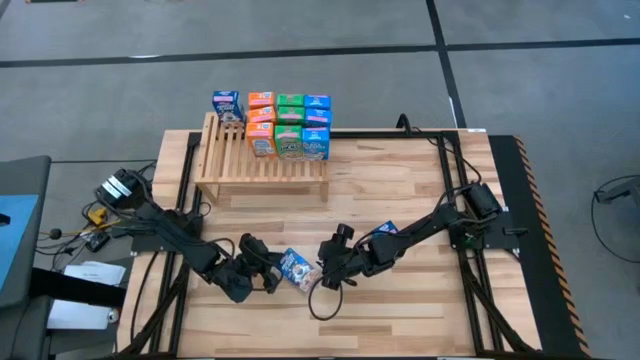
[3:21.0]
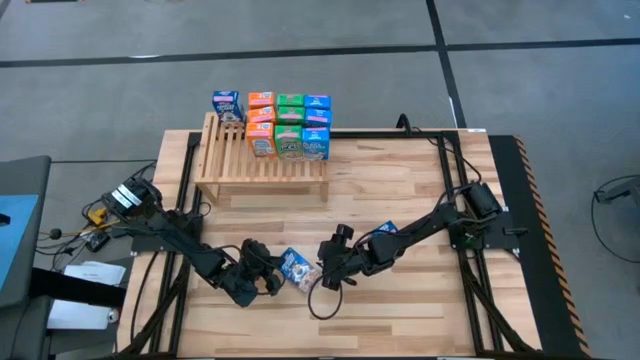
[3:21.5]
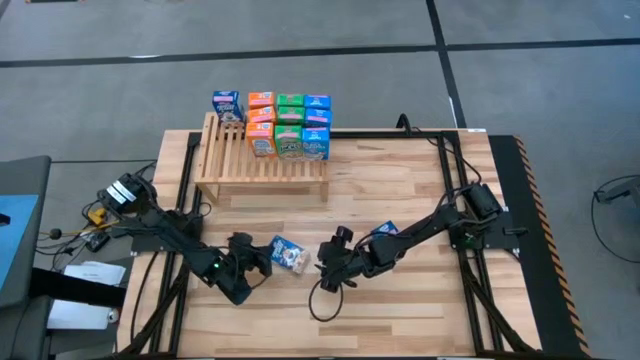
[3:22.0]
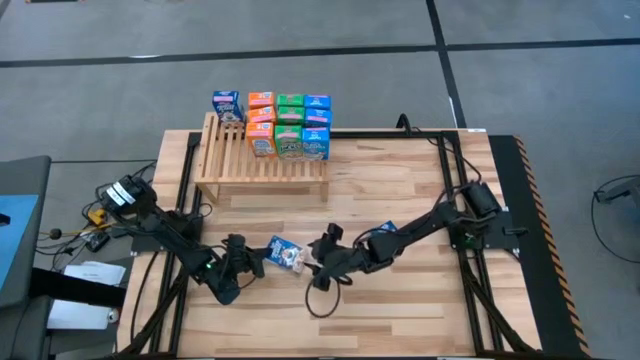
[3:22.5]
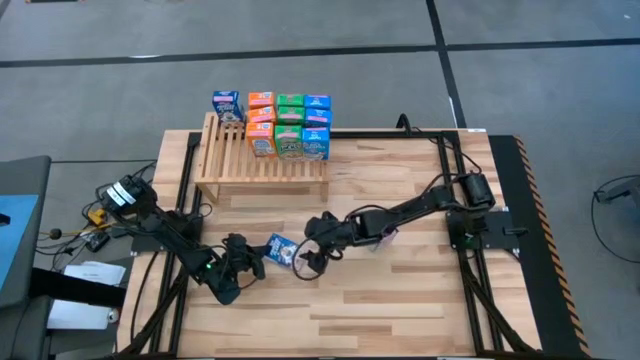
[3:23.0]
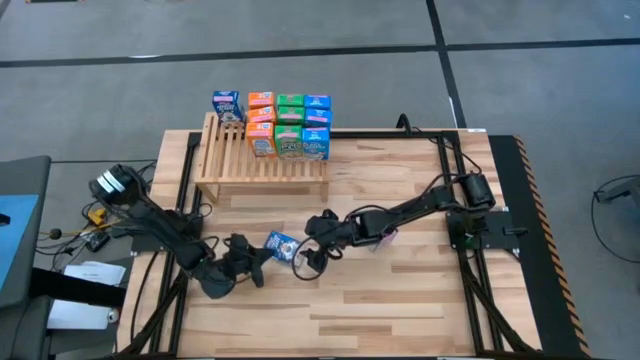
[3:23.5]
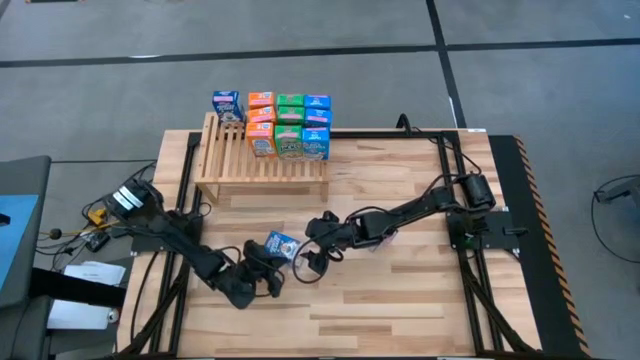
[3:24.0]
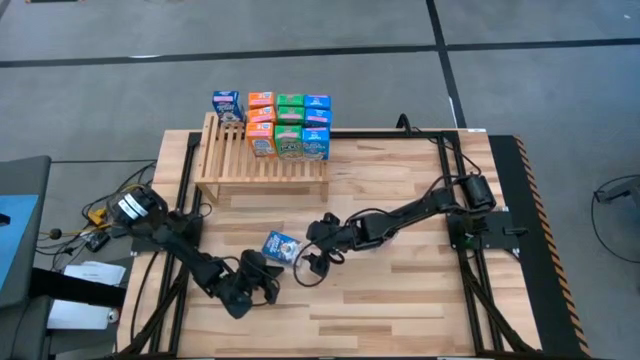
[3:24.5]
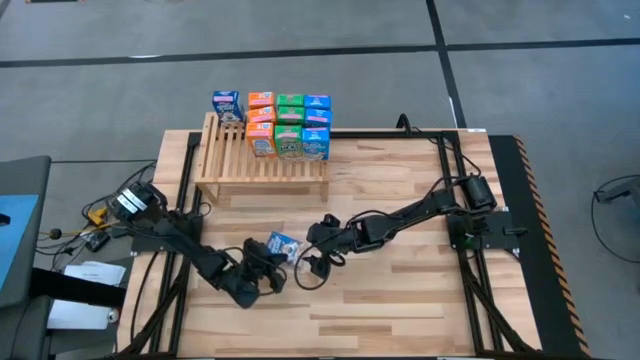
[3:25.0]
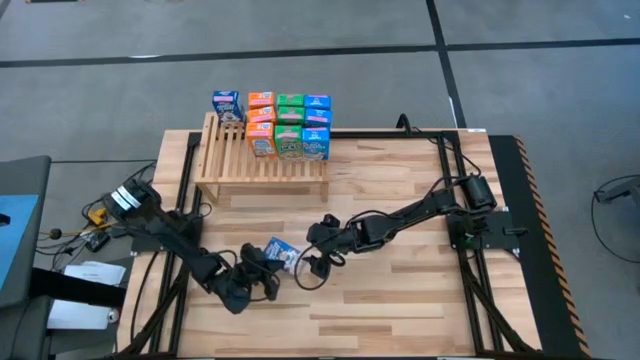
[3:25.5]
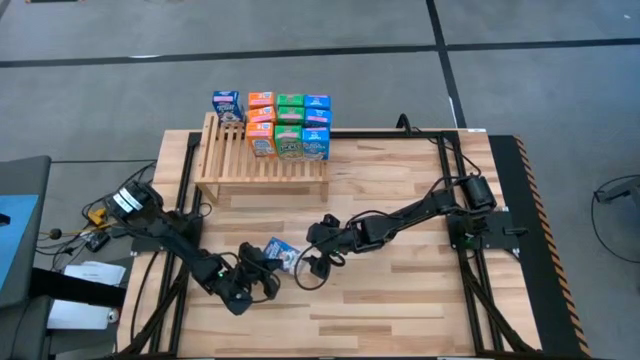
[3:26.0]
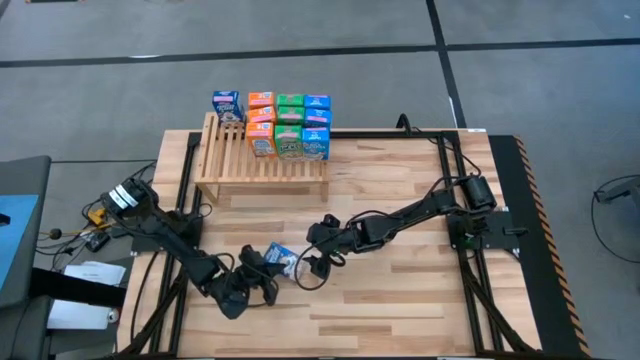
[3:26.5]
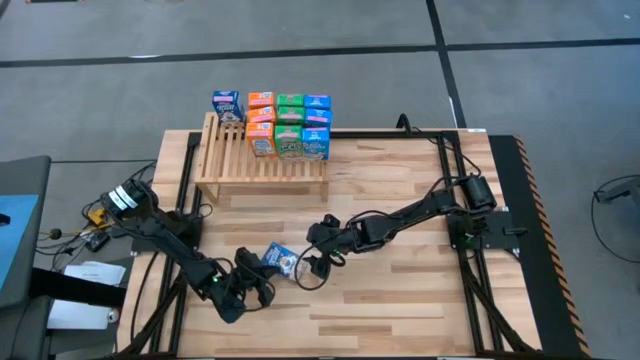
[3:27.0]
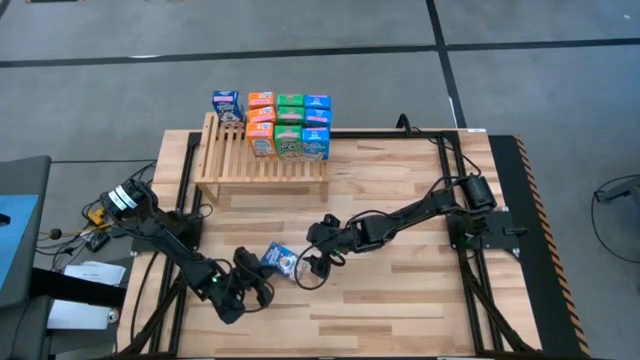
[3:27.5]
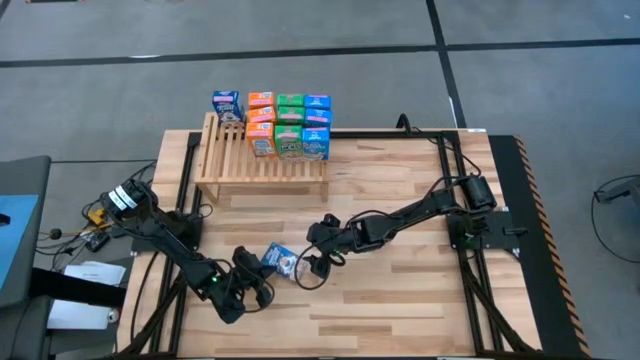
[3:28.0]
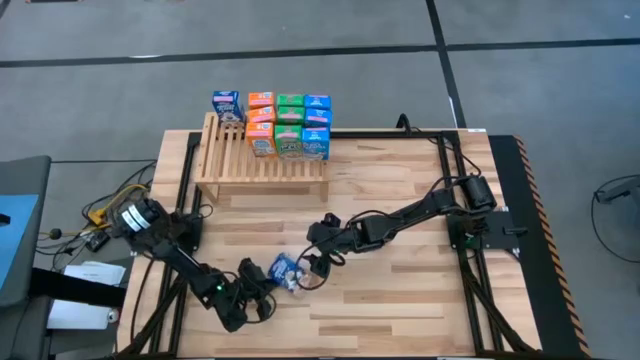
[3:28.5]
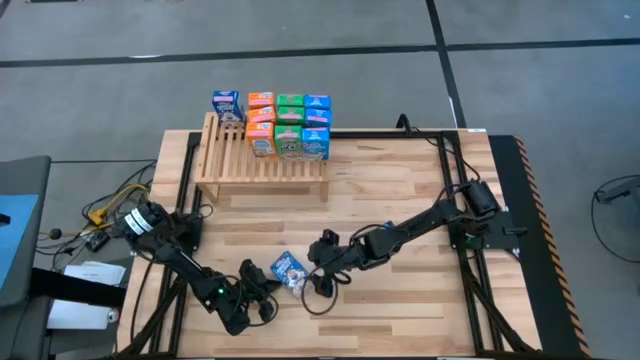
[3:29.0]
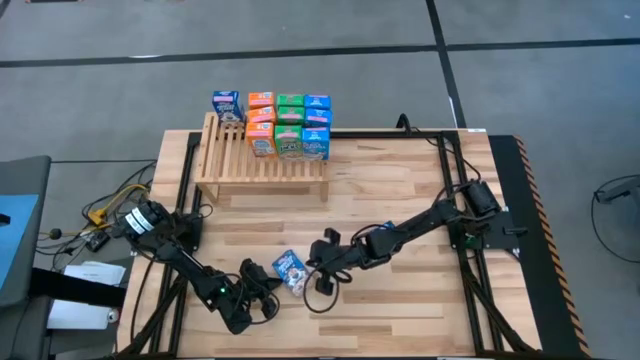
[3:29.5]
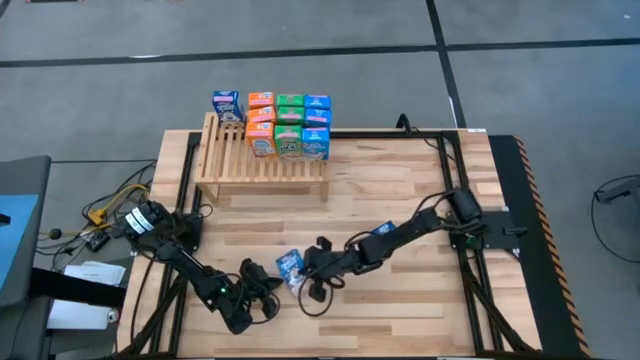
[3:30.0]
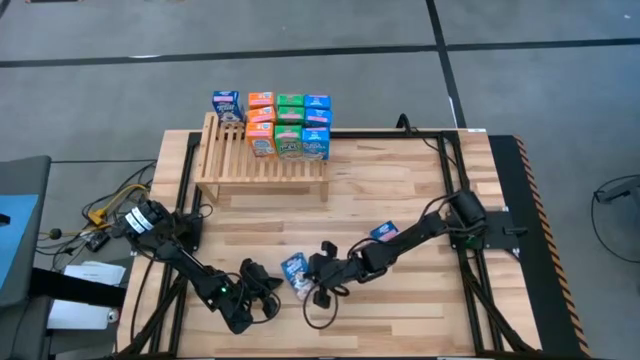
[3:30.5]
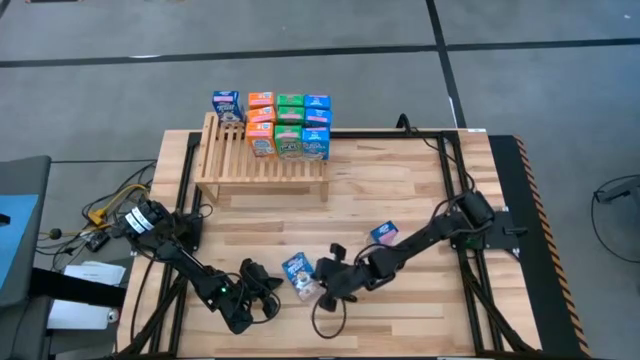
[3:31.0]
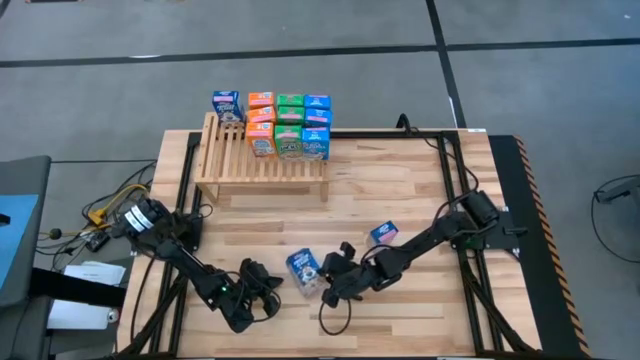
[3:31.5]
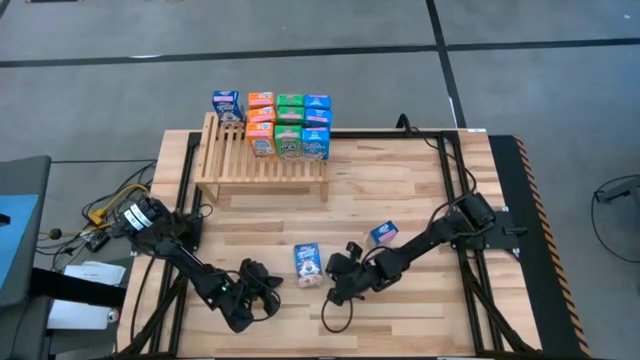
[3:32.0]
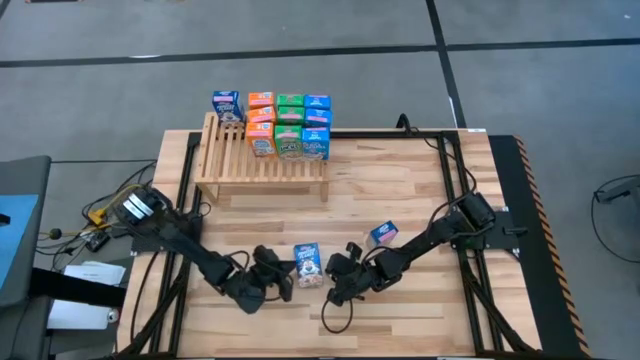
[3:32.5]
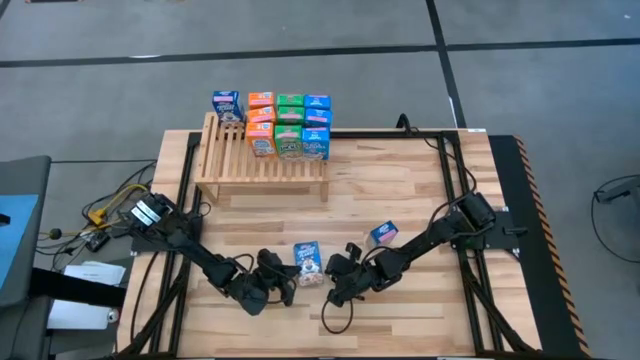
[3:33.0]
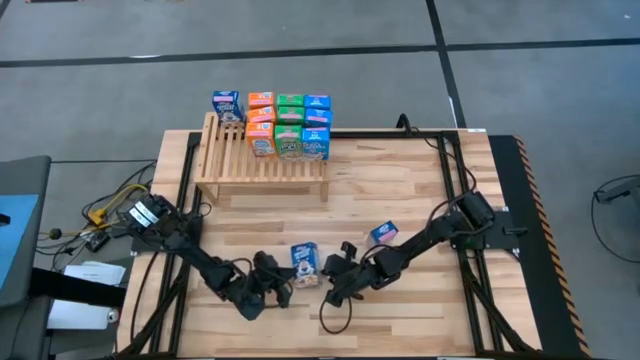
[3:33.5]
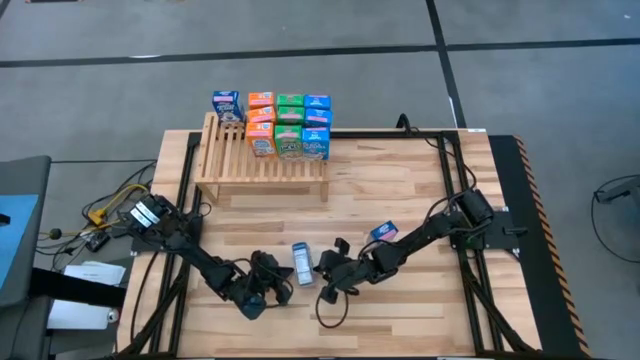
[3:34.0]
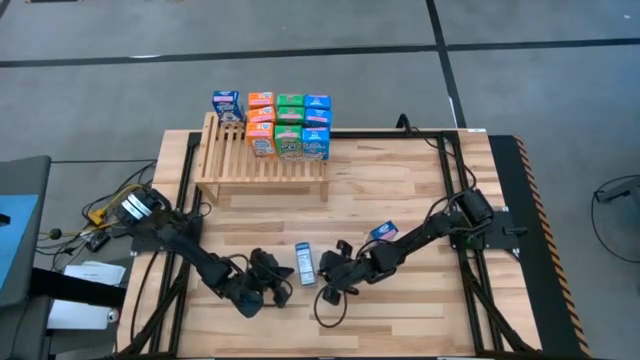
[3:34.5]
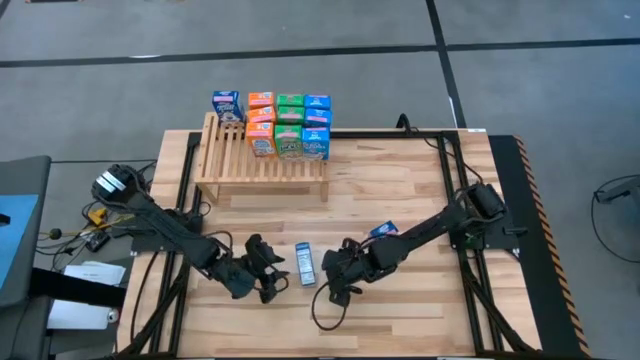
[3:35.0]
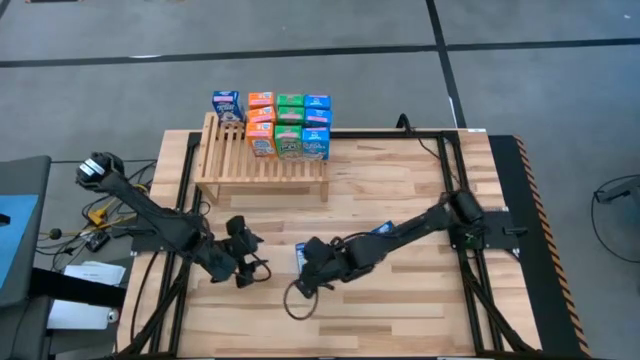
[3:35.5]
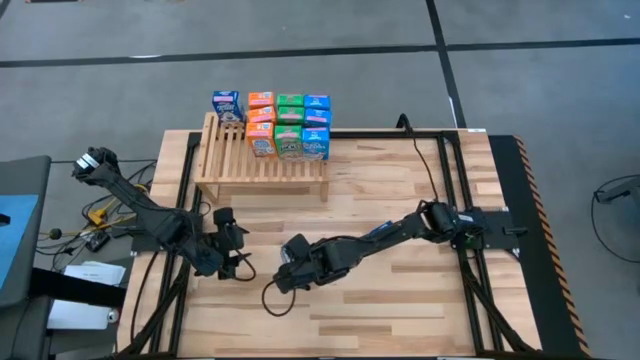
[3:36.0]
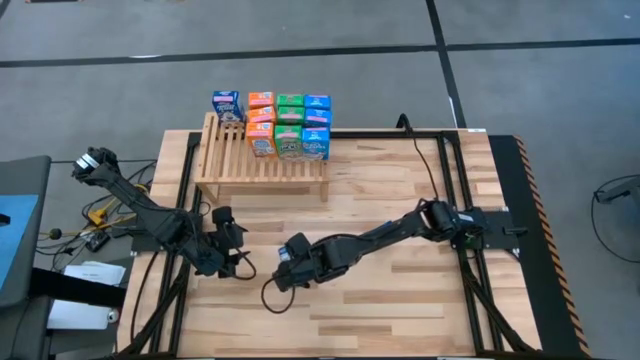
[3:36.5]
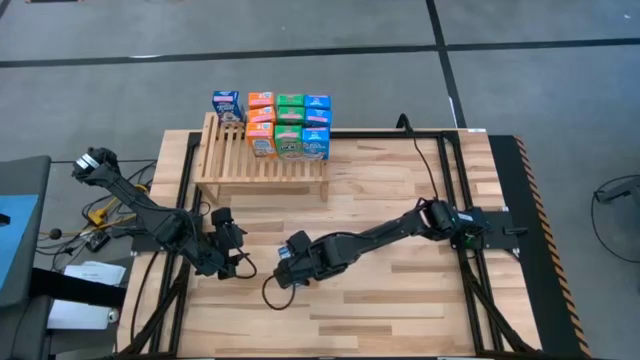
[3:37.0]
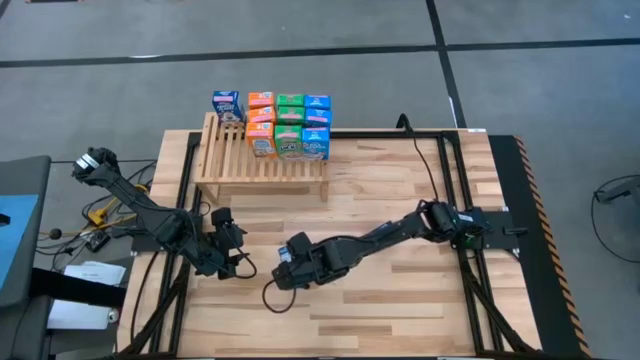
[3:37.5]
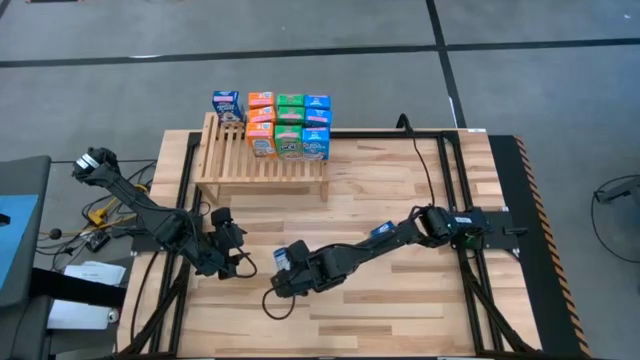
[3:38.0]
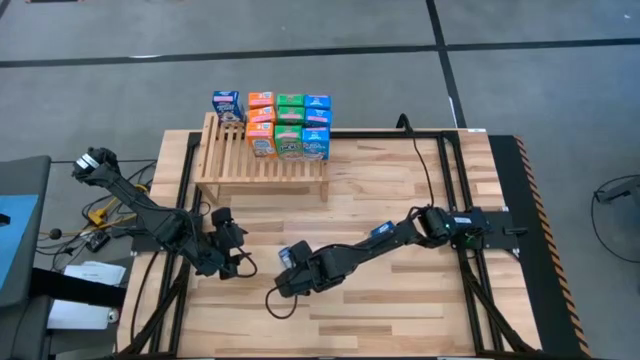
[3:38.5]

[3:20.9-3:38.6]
Task: Stack cereal on shelf
Put the left blue cereal on the shelf

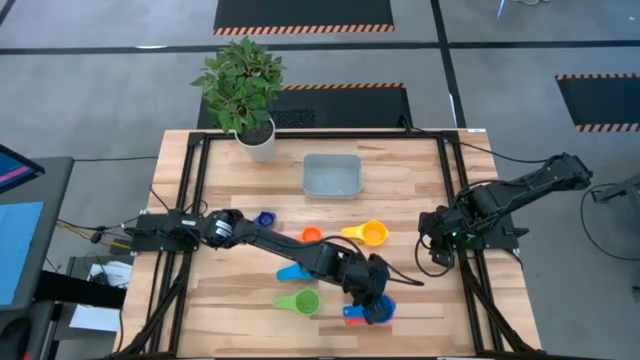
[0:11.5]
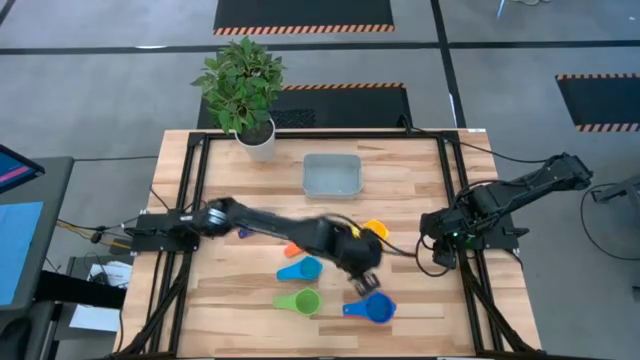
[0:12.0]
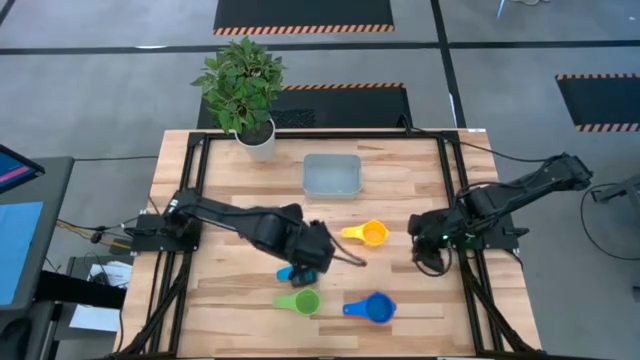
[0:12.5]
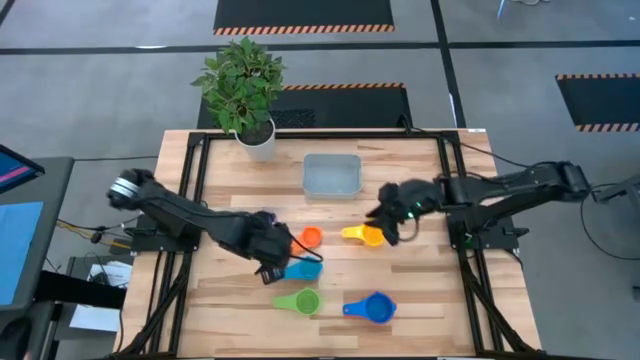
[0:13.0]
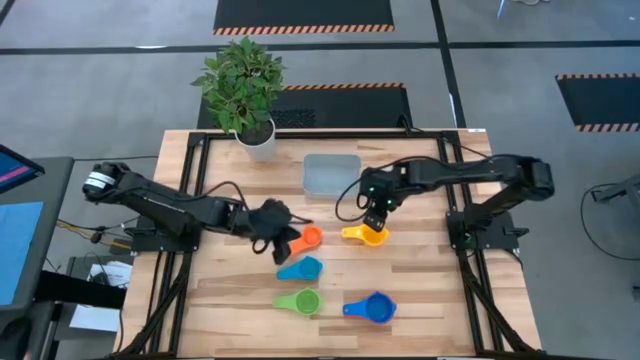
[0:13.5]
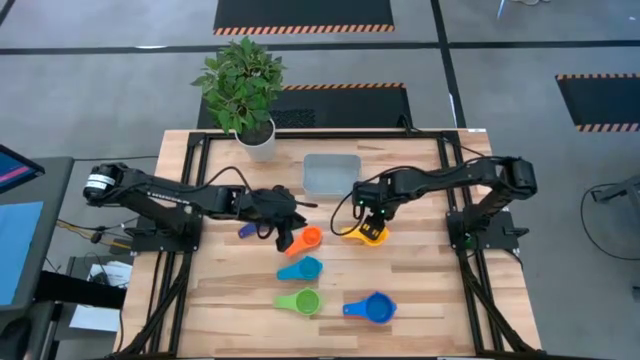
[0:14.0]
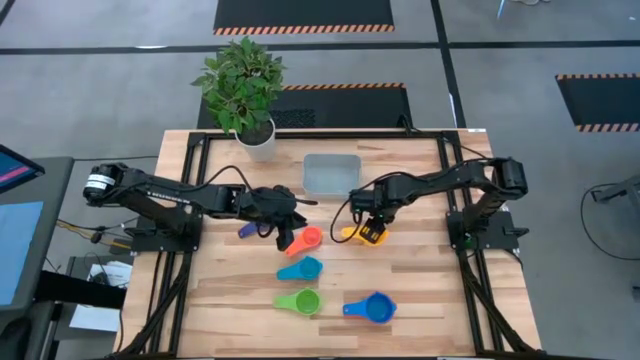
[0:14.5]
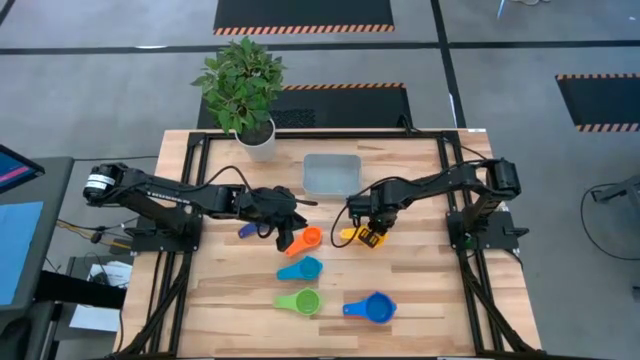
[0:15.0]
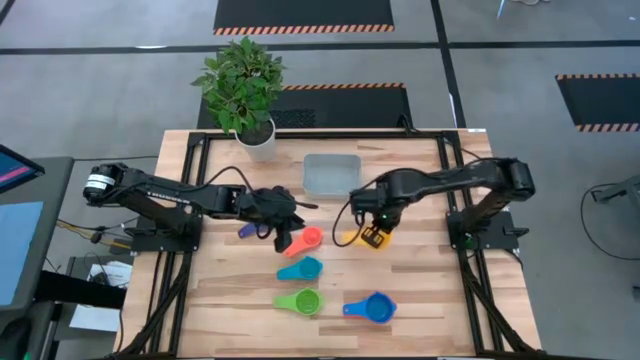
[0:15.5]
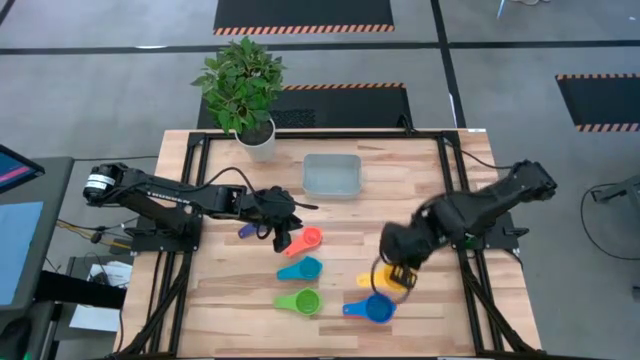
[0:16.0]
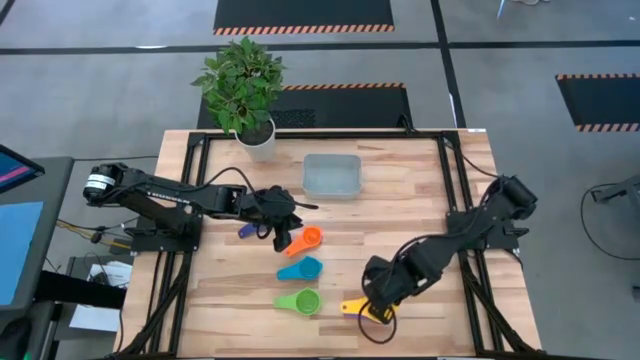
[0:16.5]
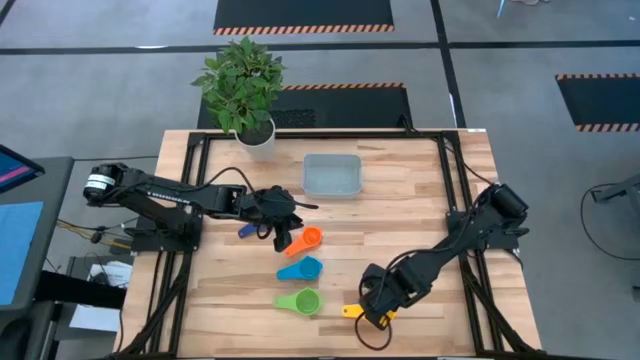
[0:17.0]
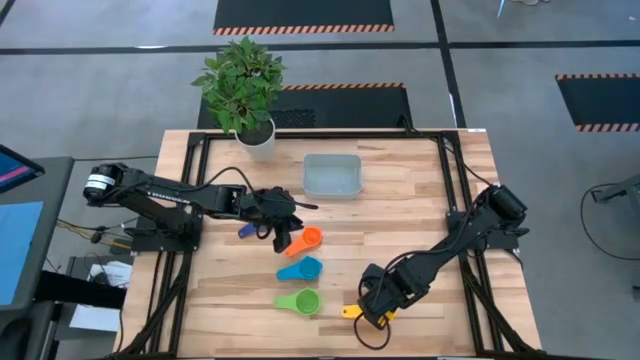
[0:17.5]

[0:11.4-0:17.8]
Task: Nest measuring cups in basket
Stack the yellow measuring cup on top of the blue measuring cup
